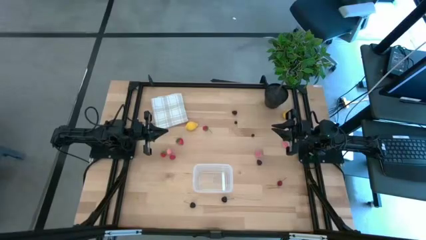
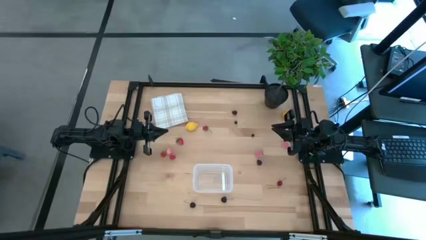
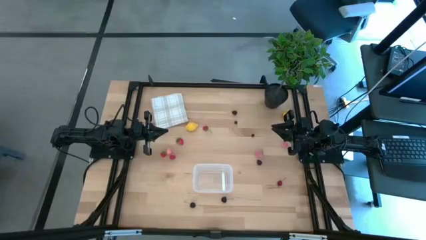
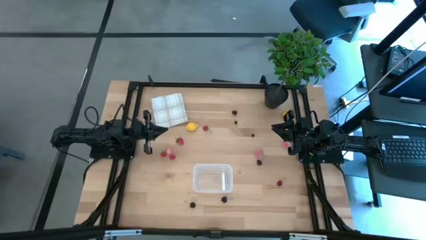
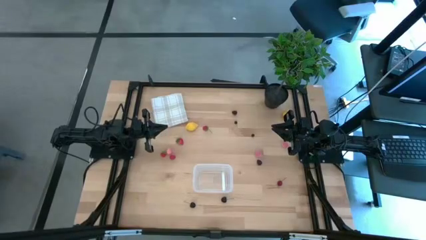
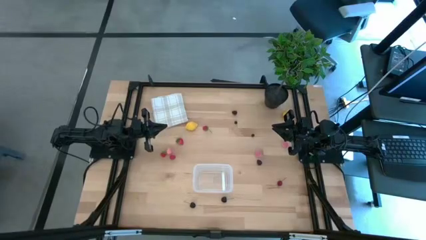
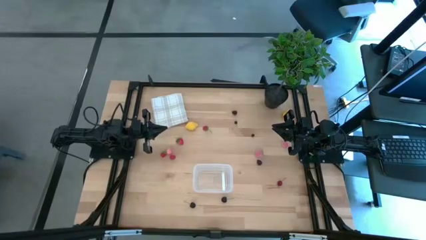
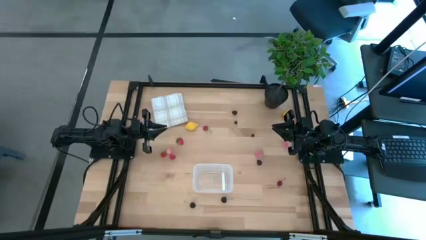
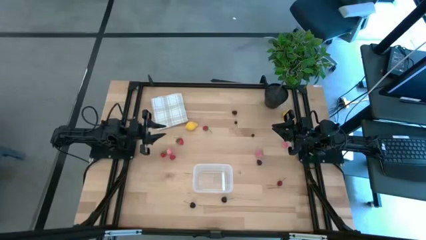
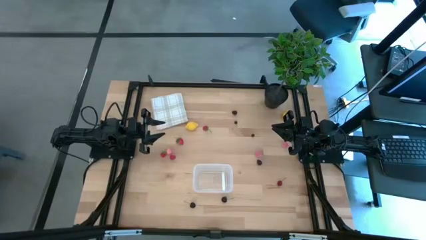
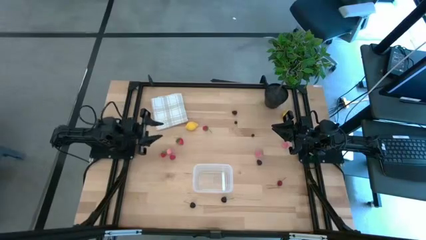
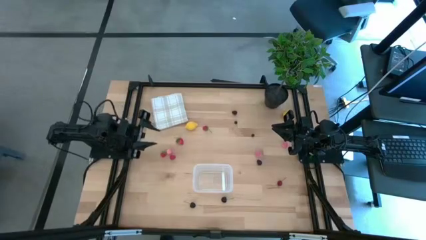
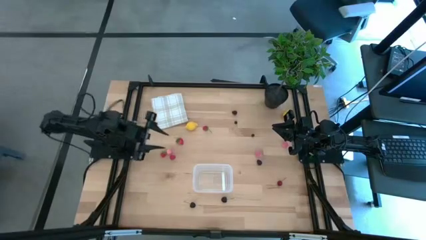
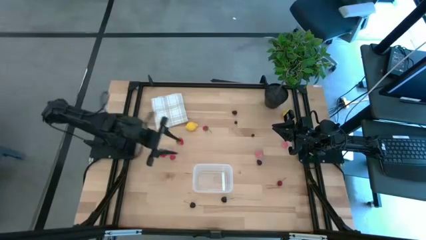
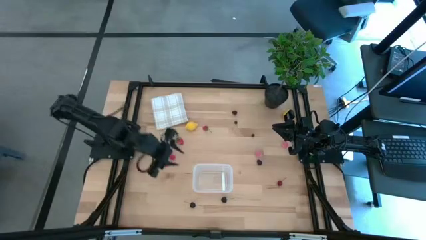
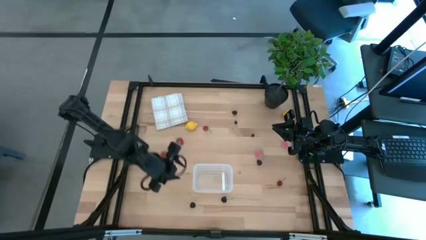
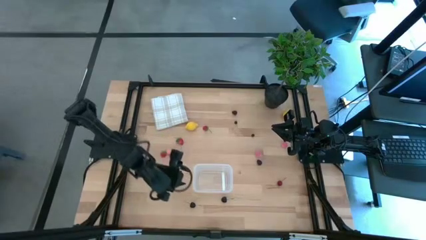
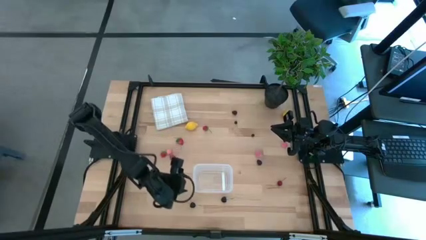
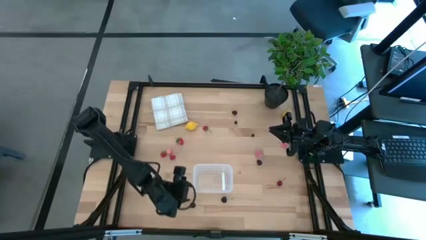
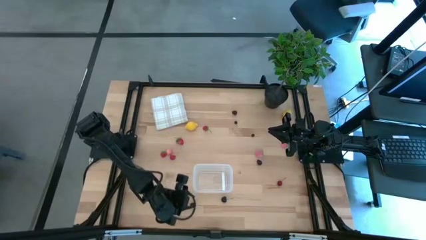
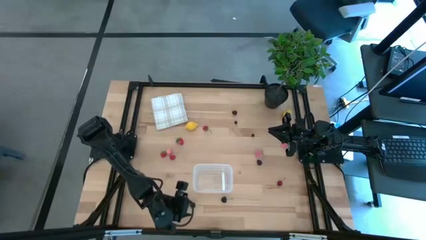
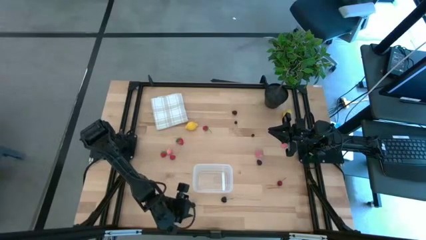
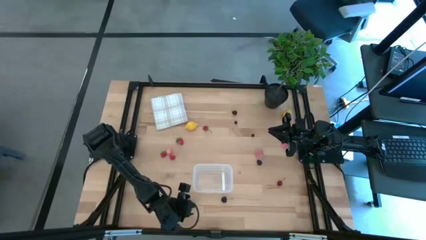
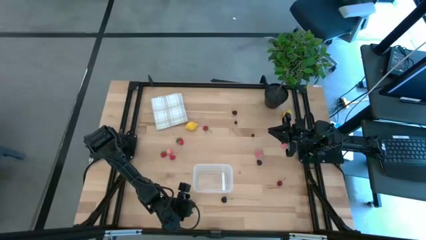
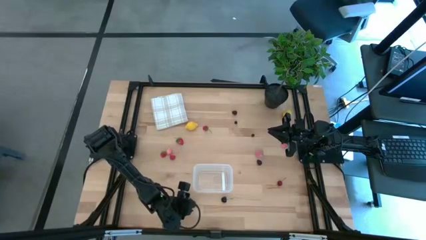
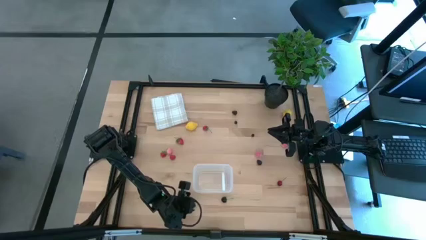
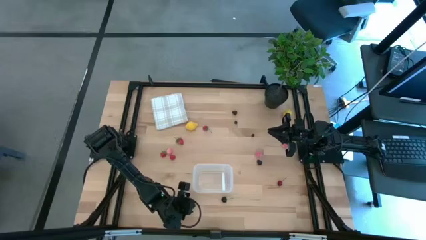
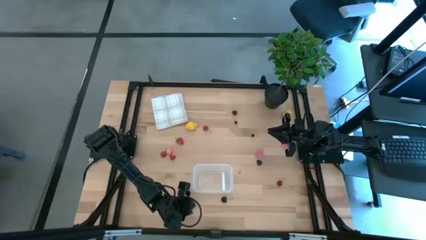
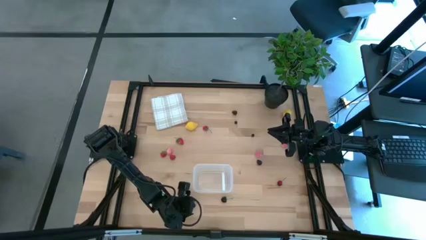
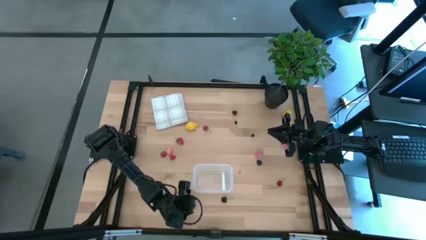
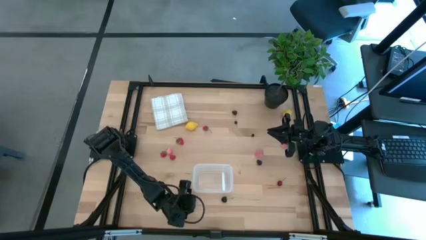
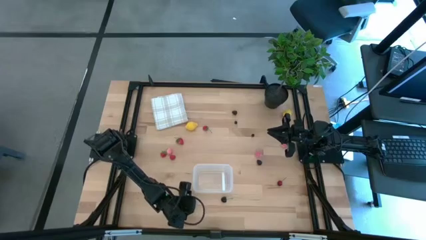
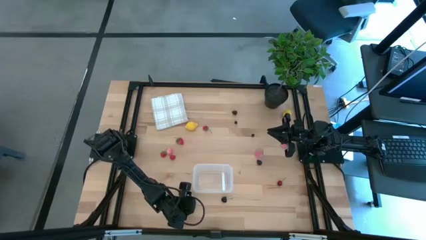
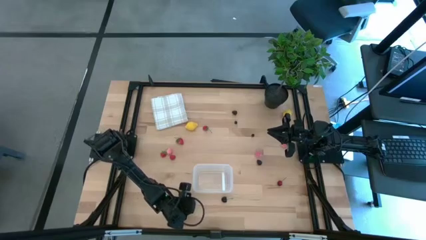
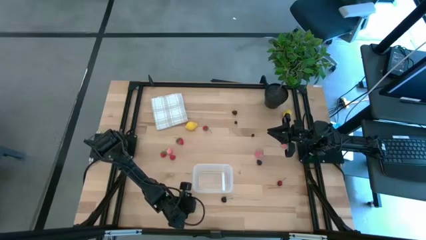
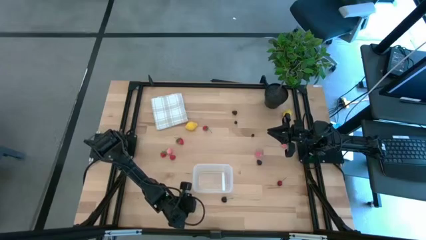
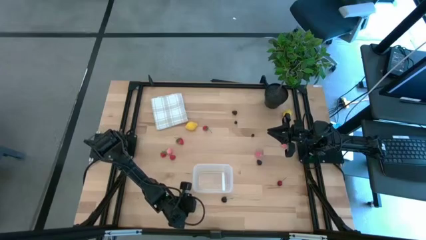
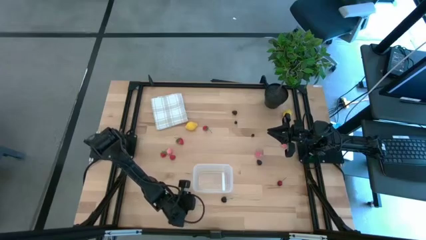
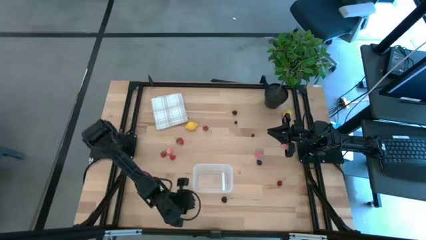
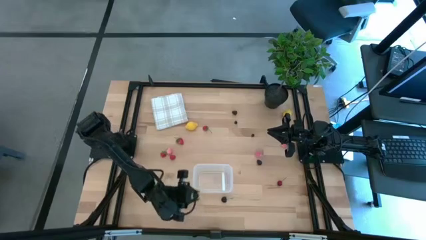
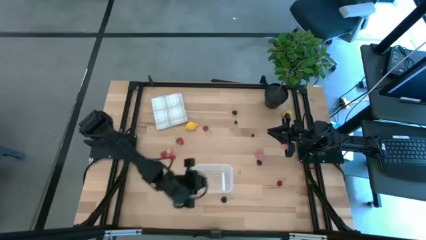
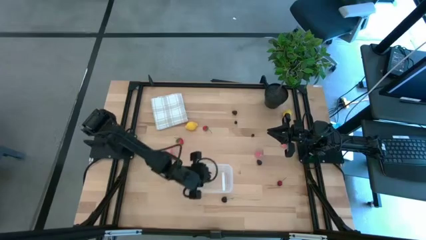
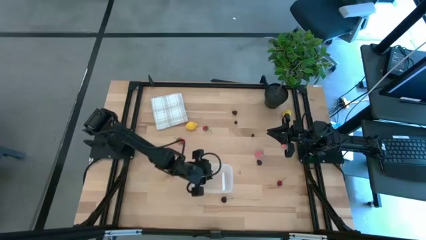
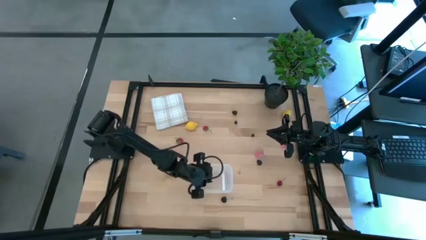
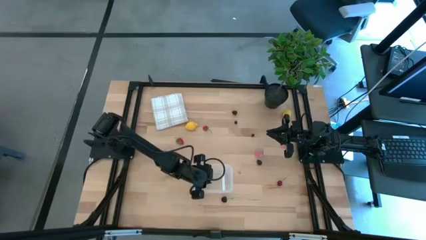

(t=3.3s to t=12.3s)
Task: Pick and placing Produce into tupperware
Put the left black cherry into the transparent bin

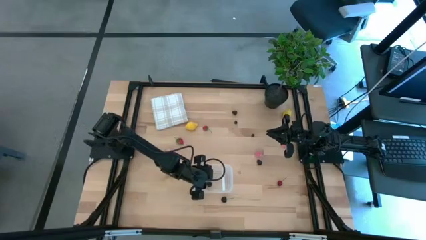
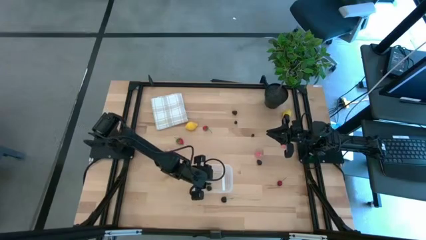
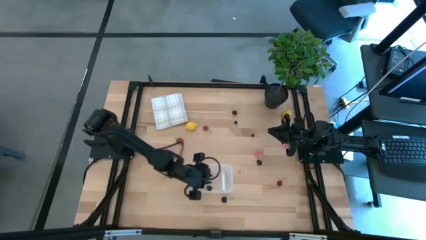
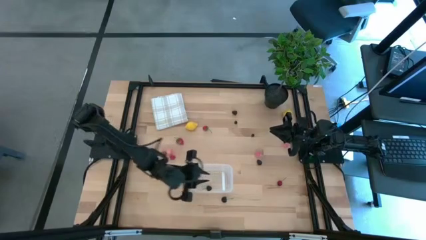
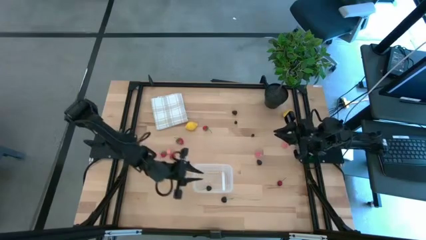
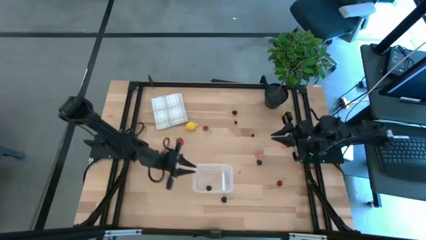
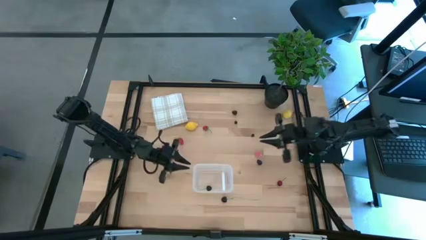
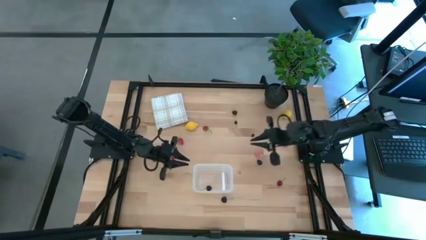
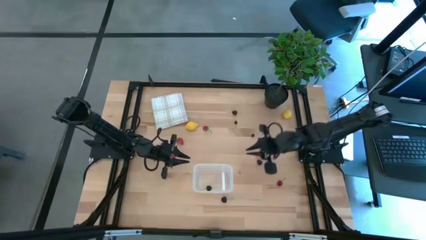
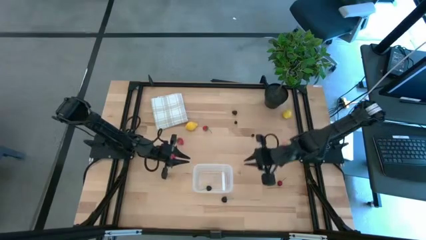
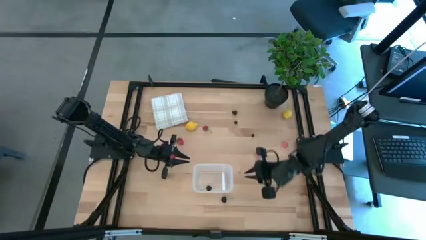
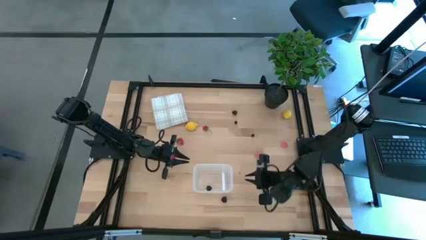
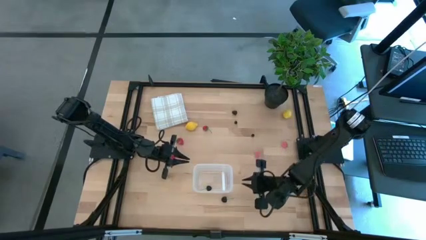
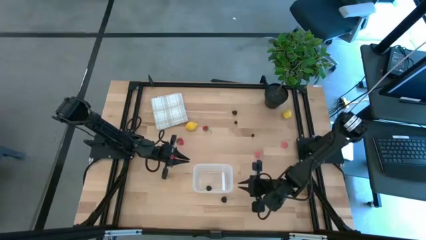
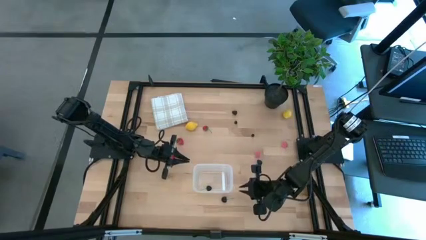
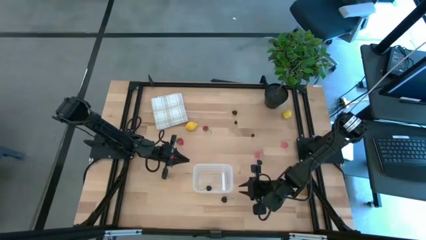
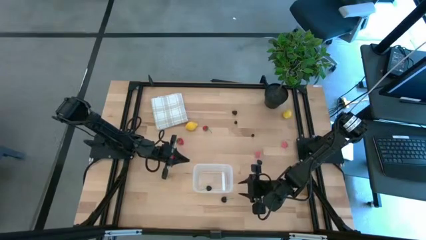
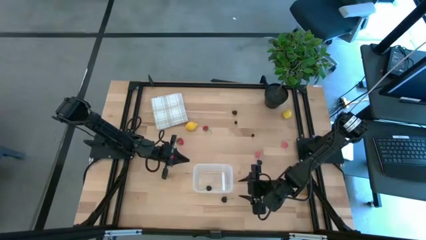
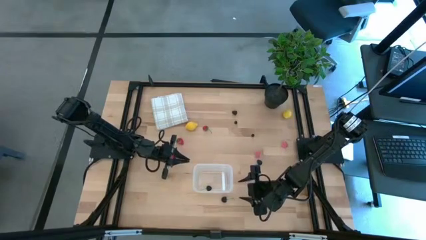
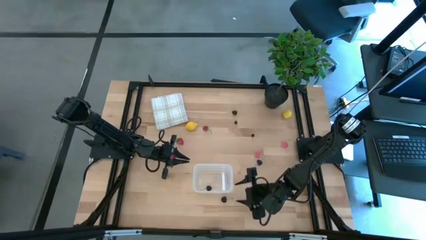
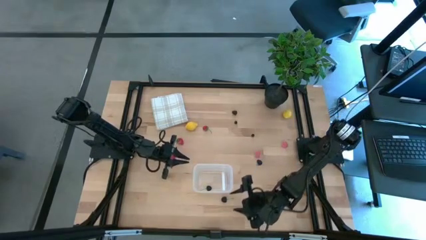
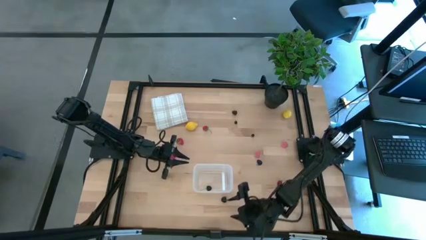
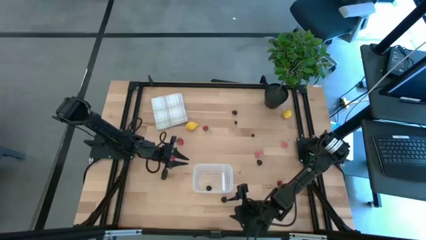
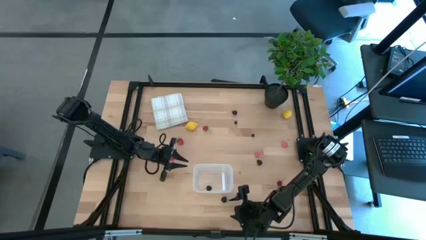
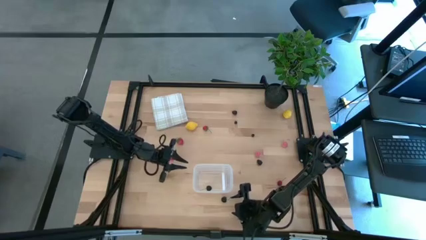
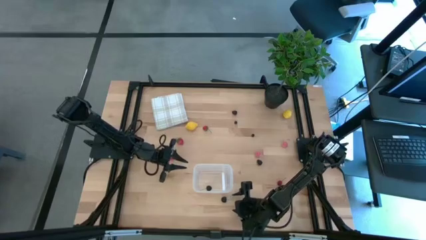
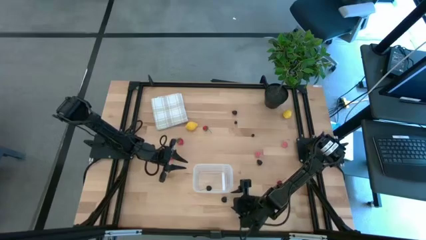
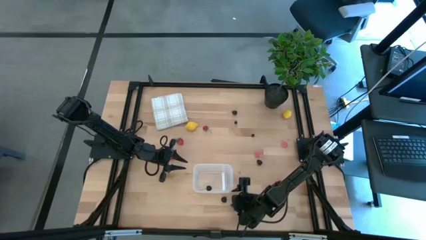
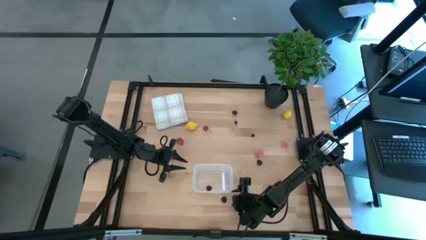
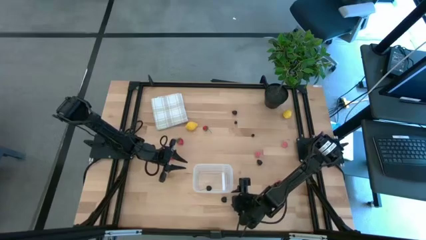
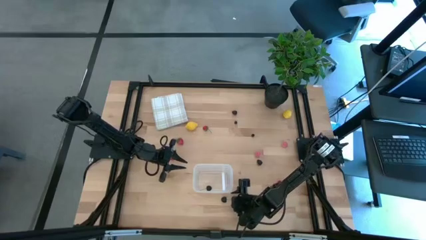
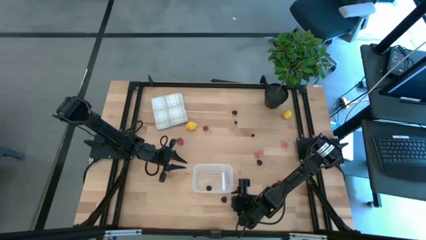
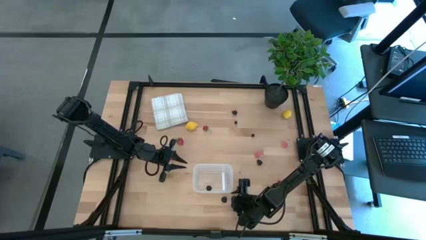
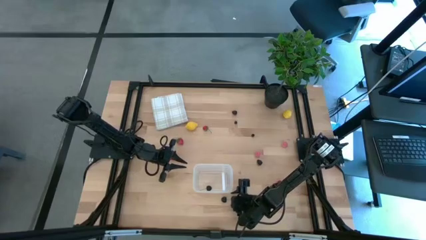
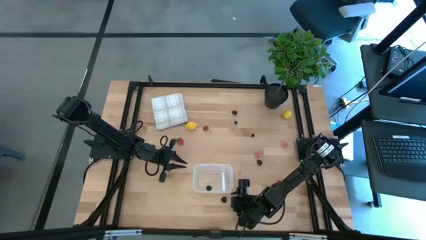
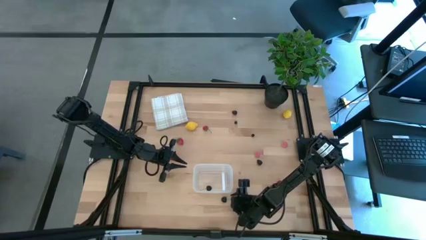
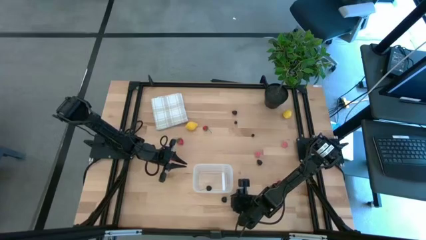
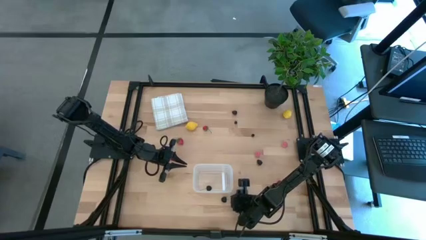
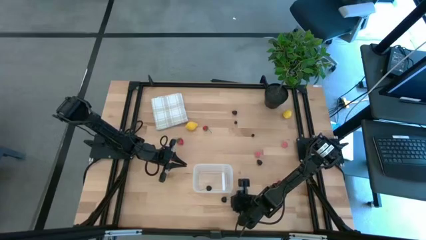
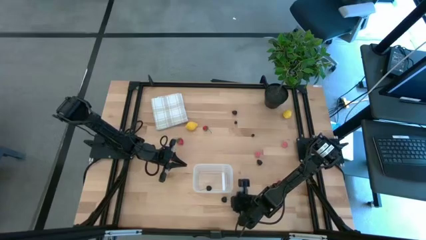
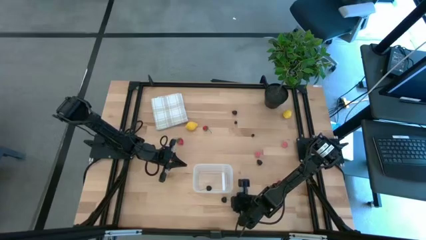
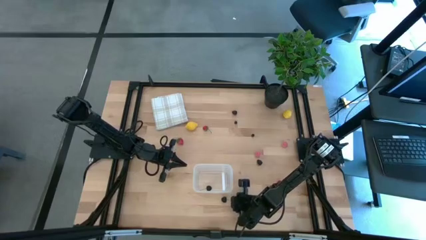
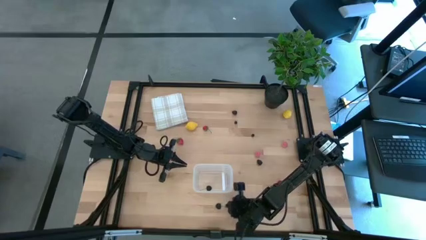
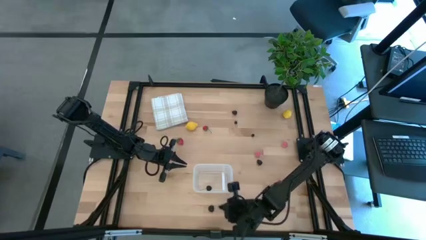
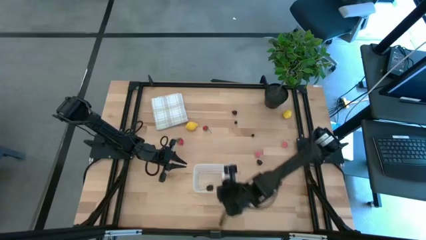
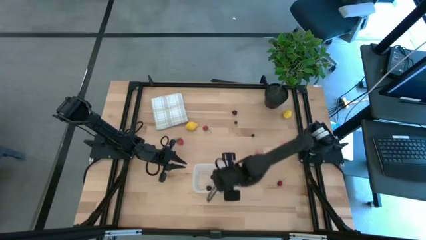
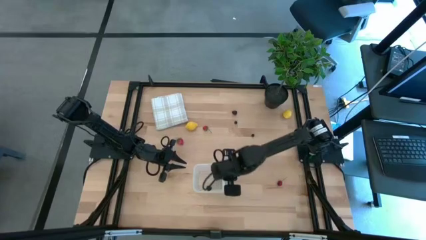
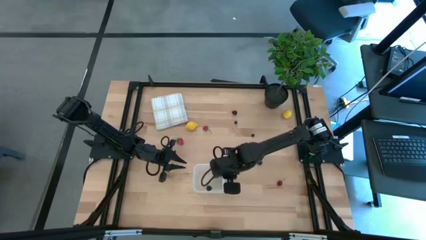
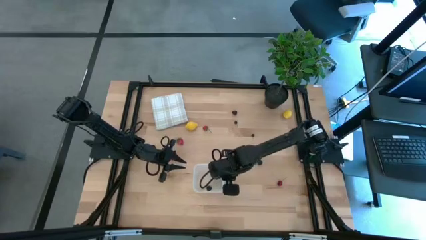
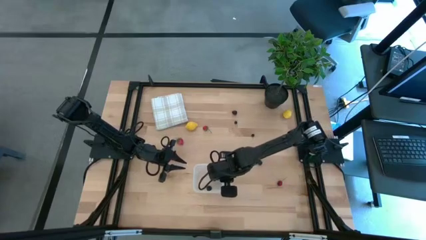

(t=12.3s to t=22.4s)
Put the black cherry into the transparent bin
